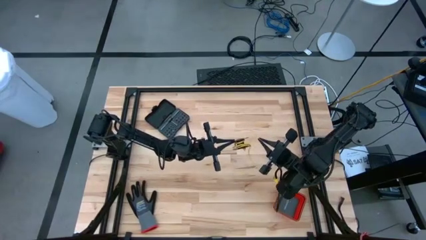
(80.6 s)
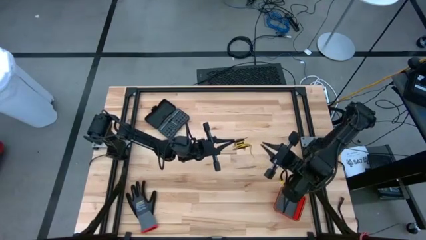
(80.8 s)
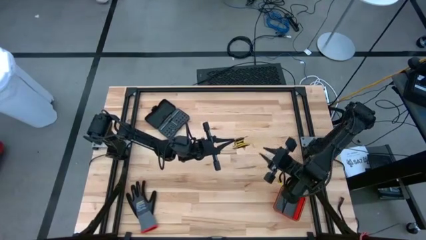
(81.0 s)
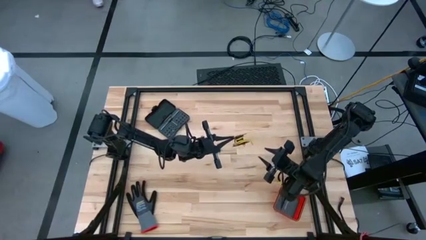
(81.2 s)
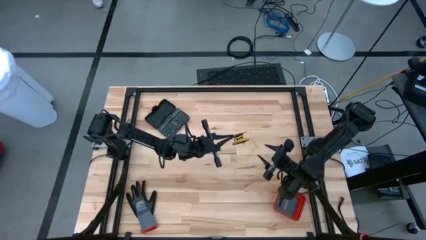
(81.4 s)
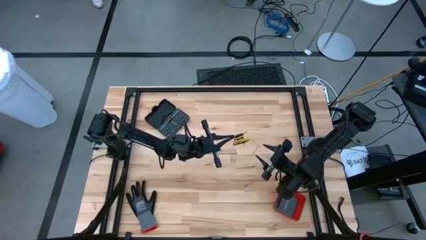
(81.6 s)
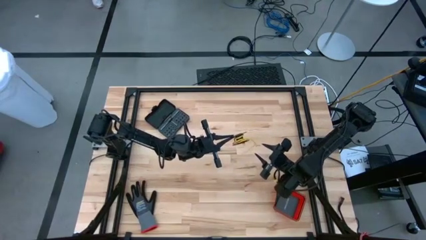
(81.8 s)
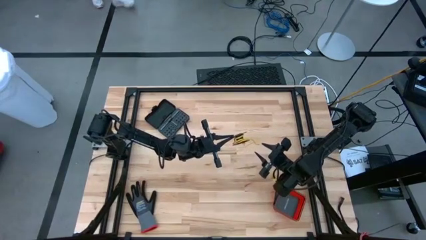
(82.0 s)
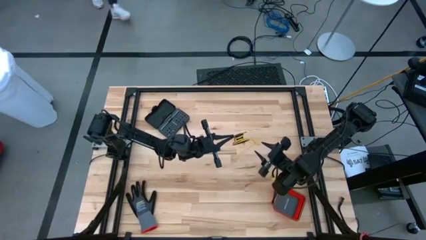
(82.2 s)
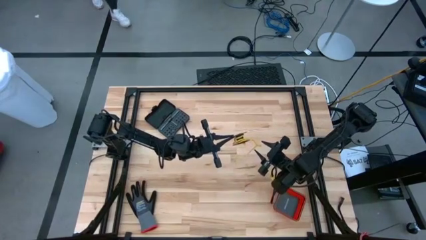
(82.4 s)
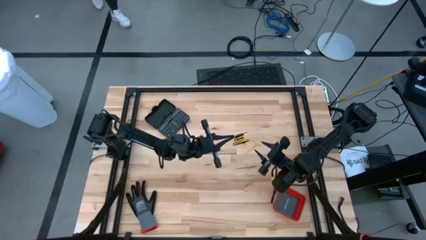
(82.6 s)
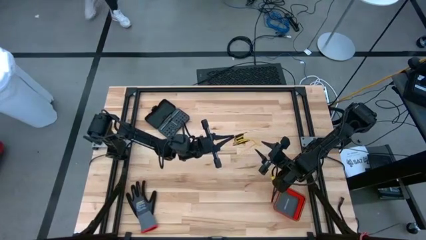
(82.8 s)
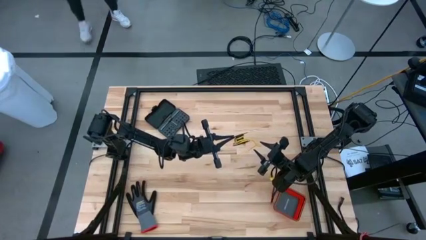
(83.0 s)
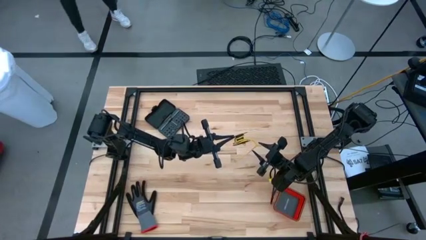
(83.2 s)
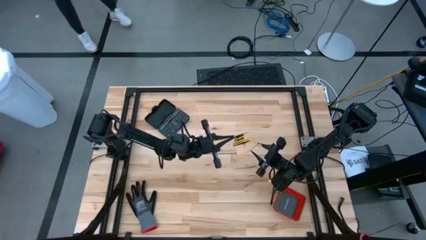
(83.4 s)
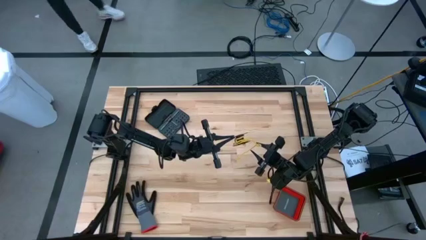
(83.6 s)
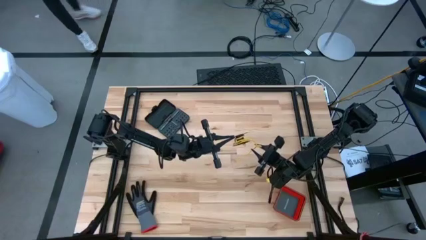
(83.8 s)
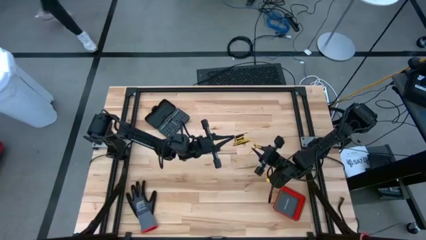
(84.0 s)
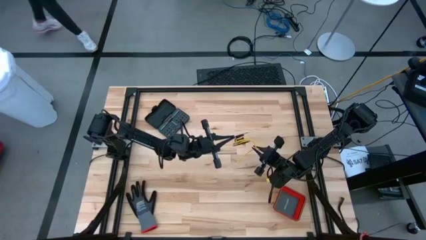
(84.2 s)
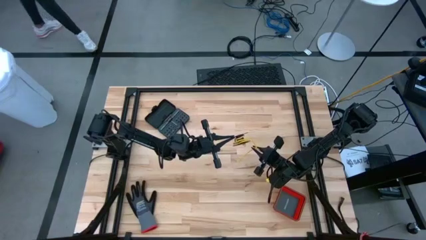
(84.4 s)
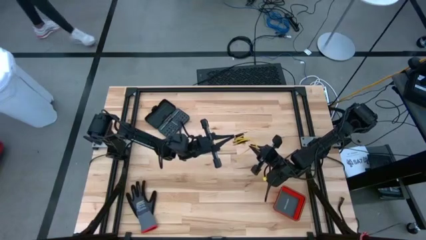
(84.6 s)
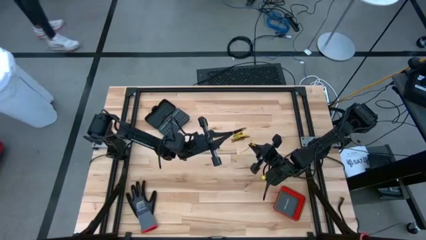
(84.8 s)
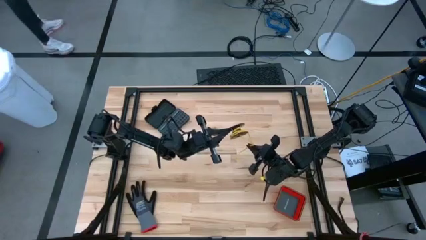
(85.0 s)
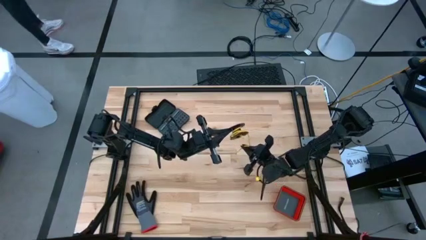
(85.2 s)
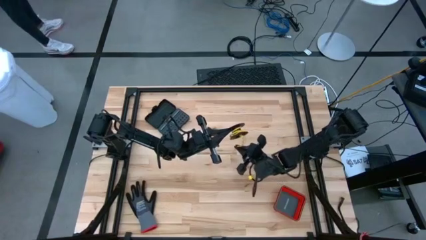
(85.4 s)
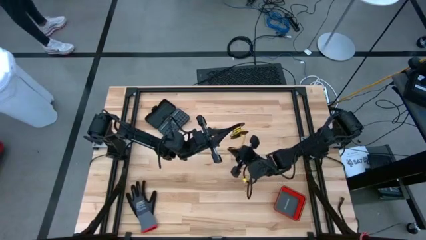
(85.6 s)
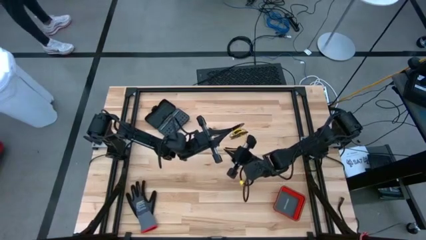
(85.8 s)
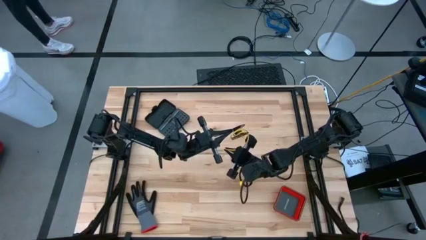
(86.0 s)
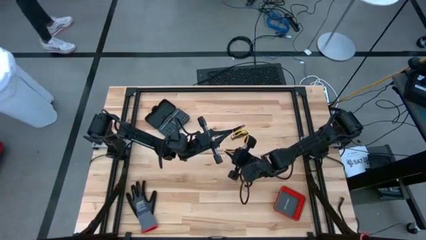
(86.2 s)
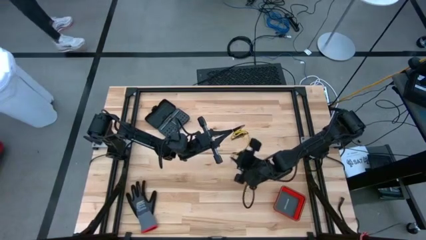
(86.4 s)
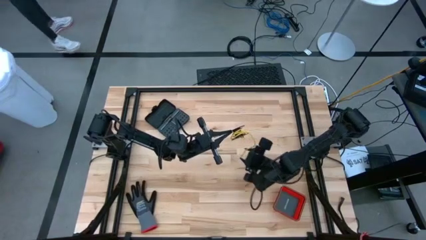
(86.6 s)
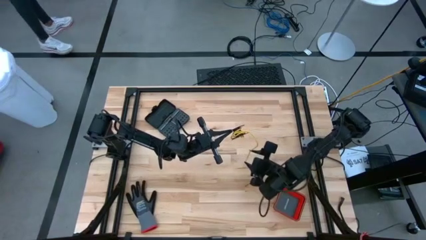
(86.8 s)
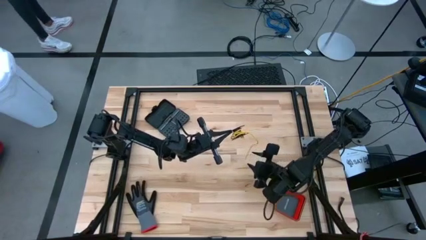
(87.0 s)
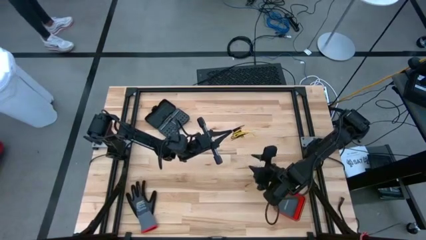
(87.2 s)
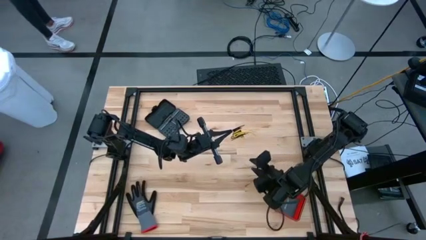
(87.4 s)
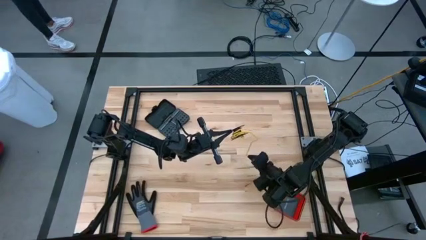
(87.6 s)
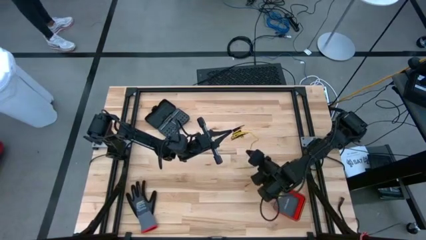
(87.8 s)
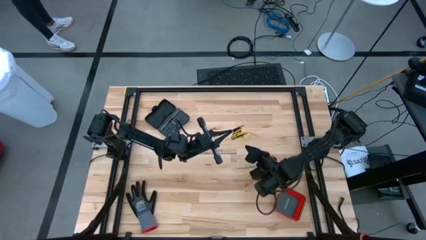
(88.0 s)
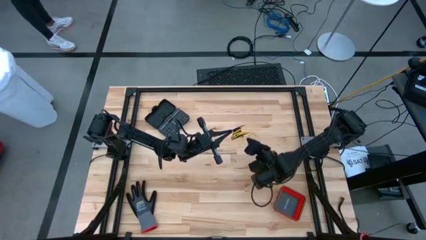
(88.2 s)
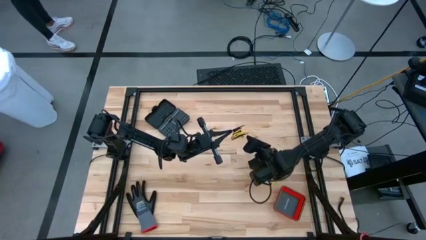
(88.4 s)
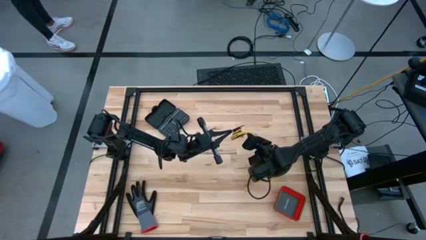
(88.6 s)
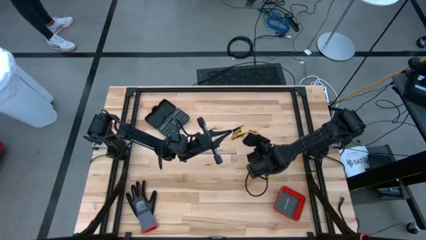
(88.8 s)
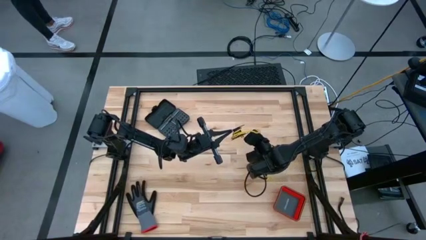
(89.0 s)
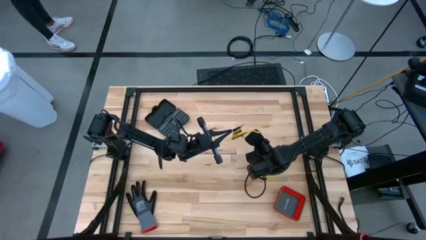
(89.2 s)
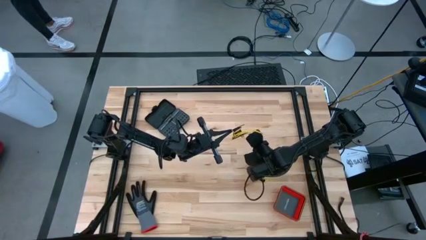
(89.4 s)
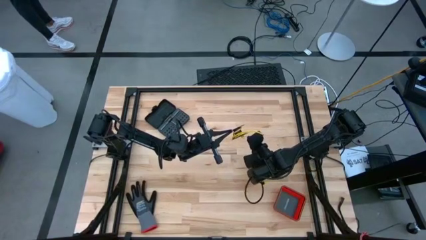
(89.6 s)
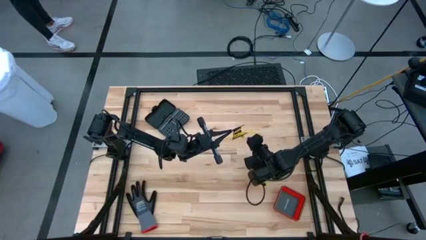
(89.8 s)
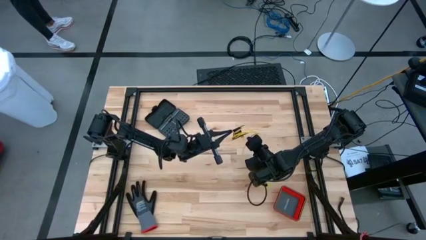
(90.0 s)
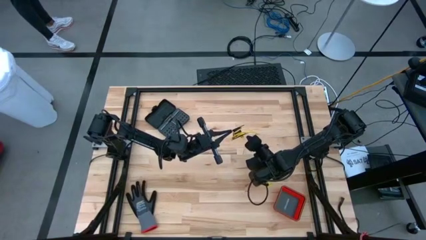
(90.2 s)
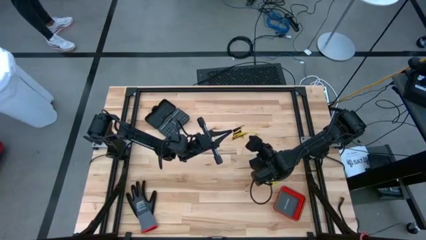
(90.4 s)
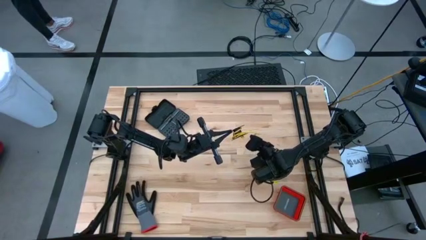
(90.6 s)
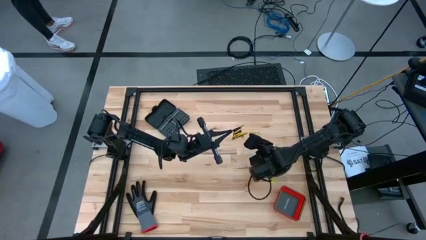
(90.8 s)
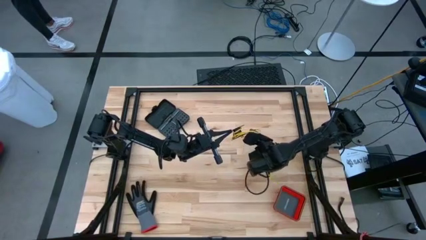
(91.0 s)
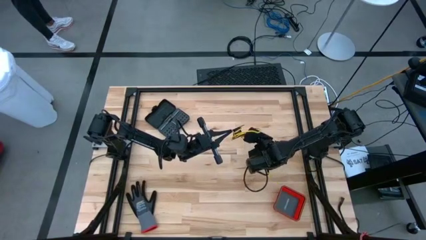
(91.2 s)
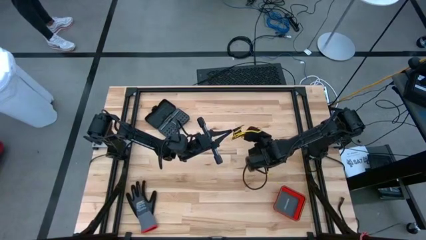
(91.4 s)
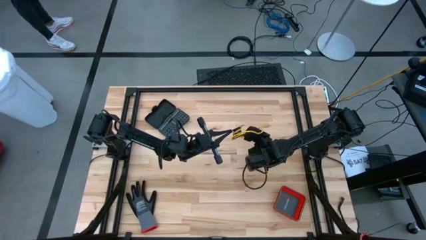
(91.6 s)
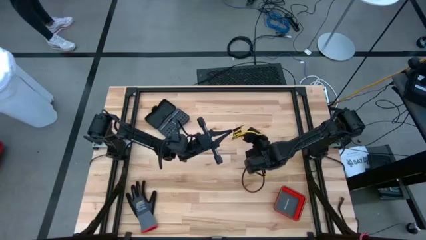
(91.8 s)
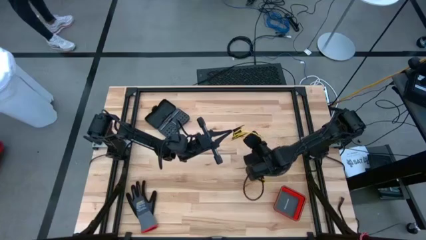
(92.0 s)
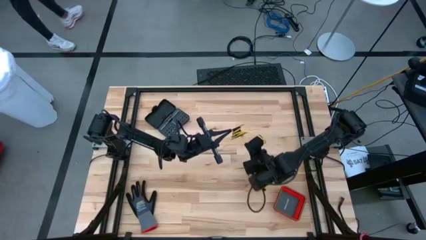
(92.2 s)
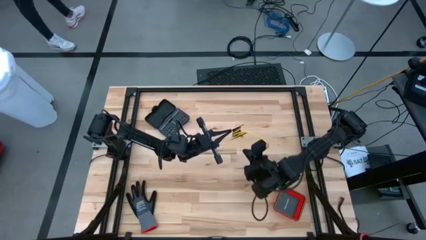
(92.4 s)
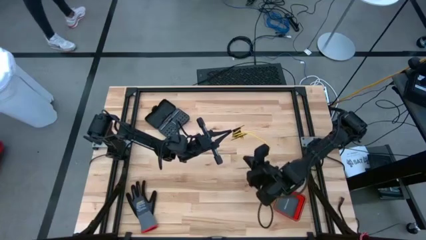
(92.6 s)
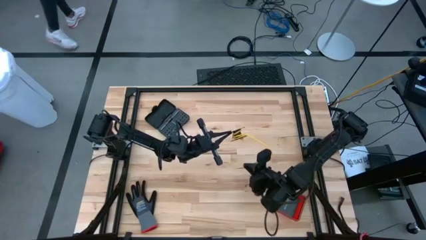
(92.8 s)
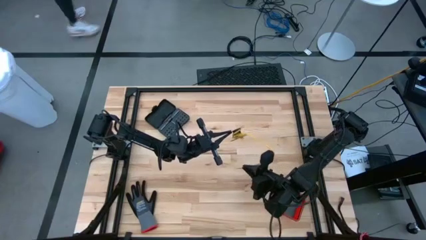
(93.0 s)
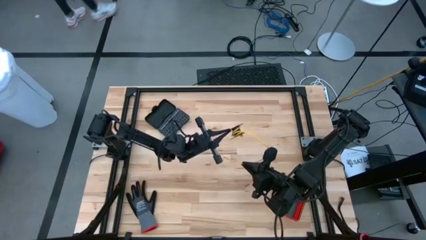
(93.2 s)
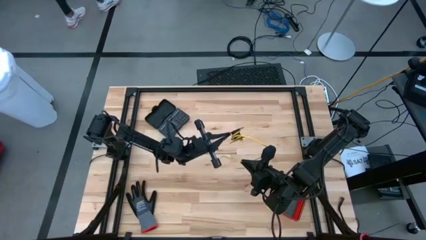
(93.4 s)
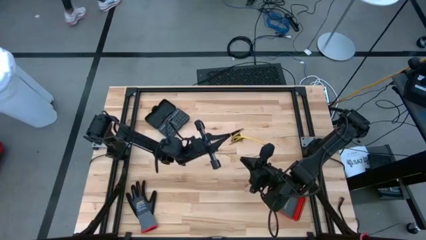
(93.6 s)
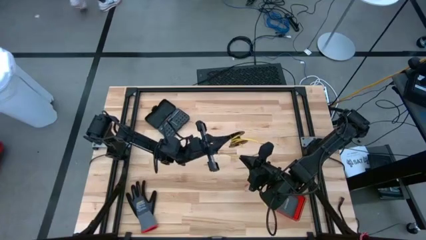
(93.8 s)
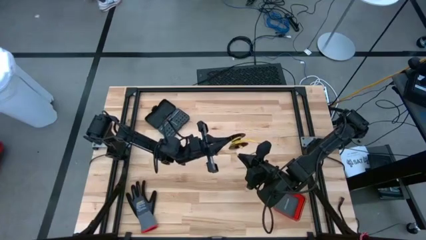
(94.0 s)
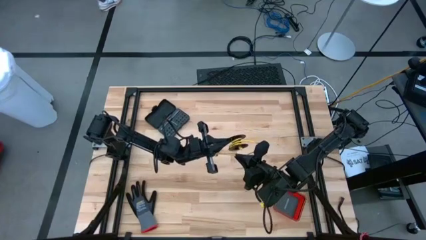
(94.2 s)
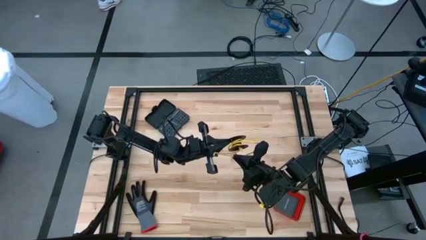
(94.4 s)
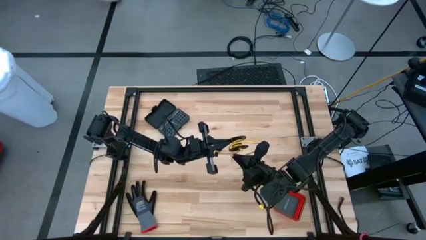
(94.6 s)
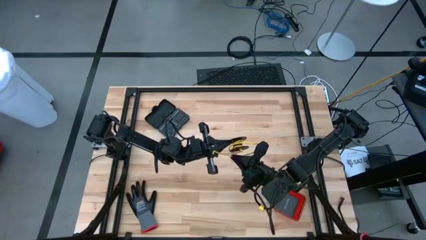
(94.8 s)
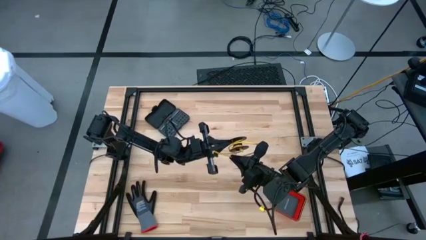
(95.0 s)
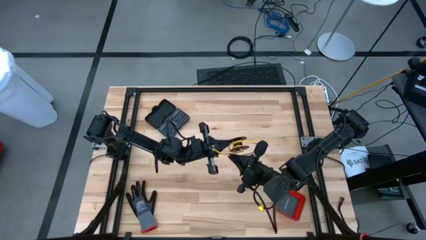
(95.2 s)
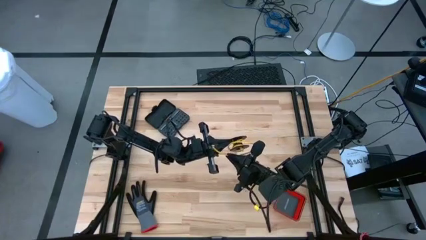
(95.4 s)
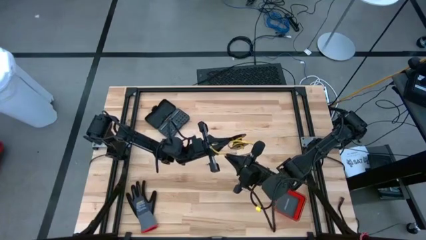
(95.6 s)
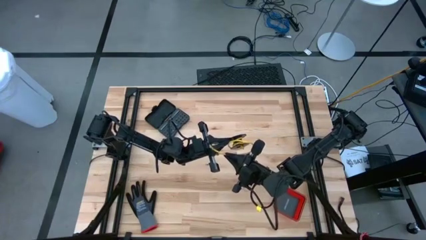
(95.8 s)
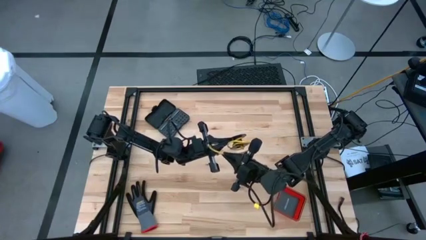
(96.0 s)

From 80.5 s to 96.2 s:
Task: Coil cords
Coil the yellow wire onto the spool
